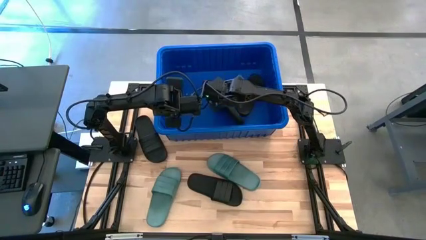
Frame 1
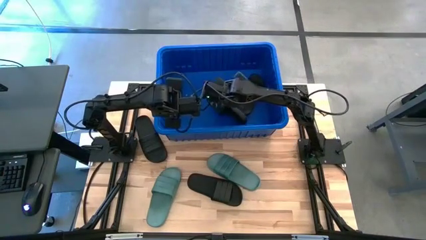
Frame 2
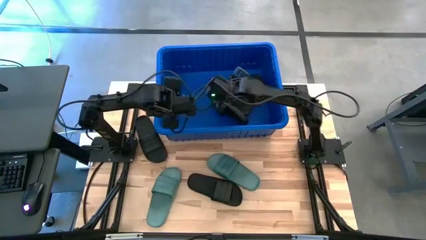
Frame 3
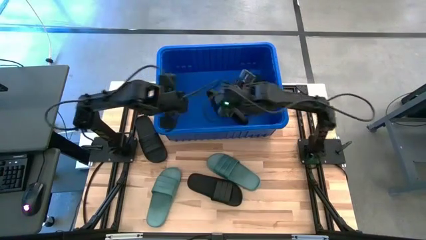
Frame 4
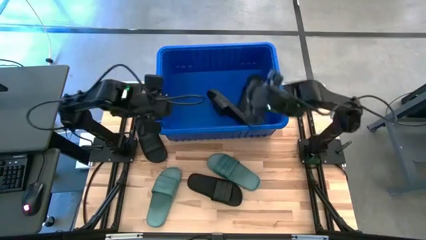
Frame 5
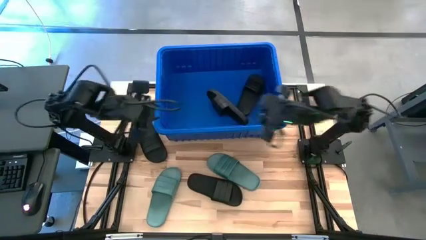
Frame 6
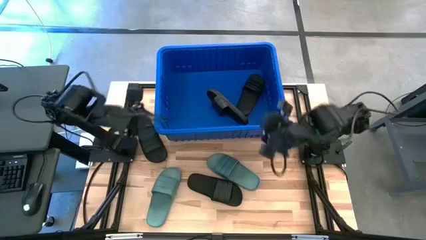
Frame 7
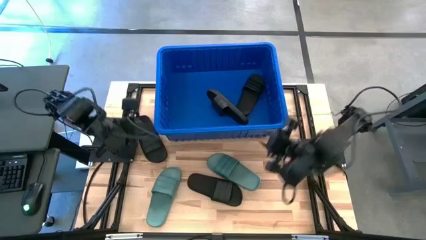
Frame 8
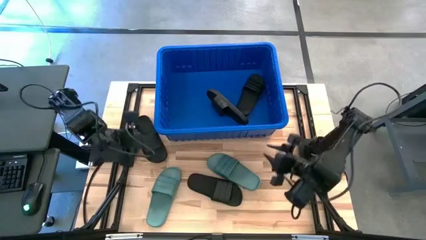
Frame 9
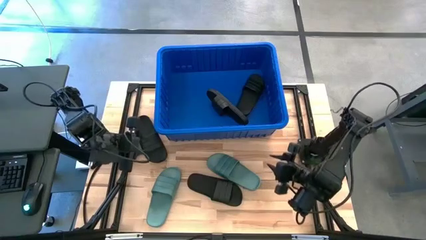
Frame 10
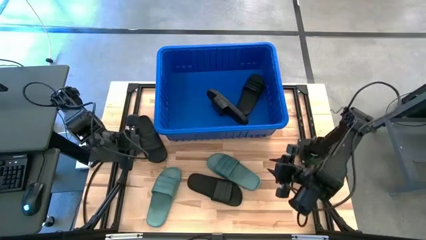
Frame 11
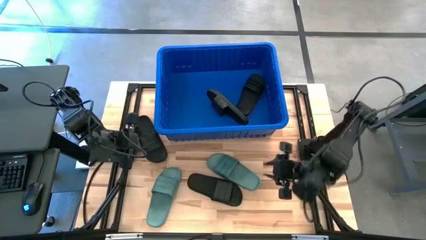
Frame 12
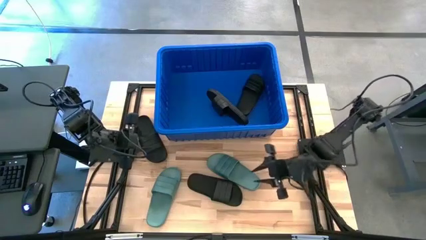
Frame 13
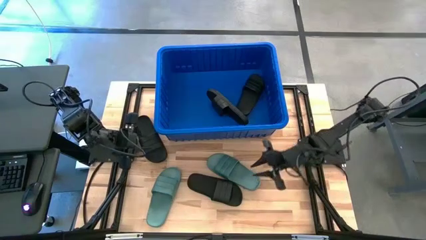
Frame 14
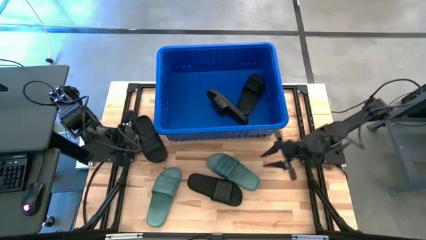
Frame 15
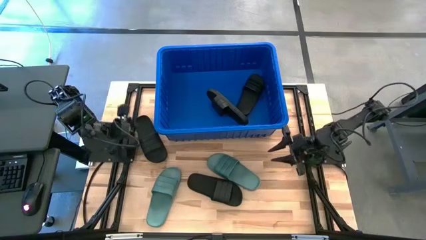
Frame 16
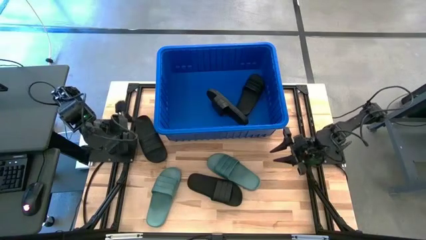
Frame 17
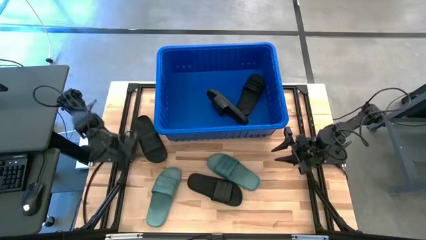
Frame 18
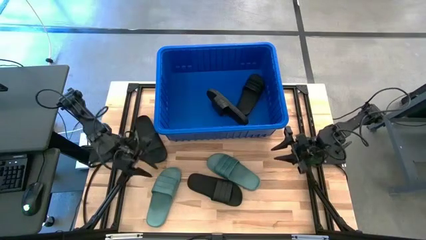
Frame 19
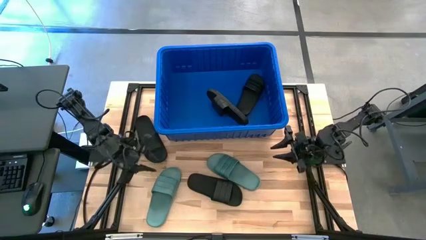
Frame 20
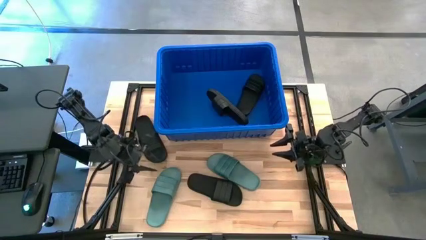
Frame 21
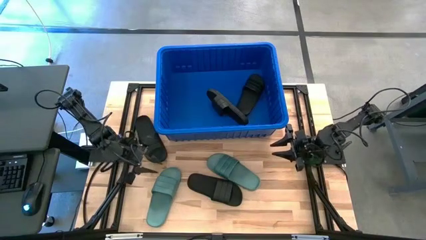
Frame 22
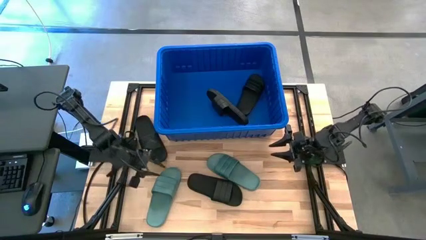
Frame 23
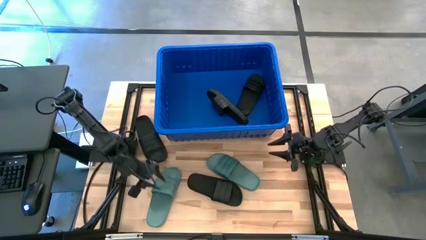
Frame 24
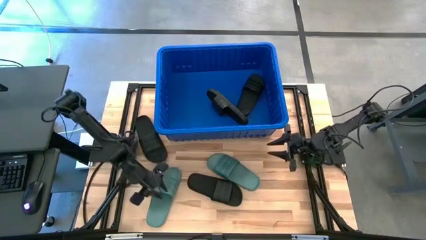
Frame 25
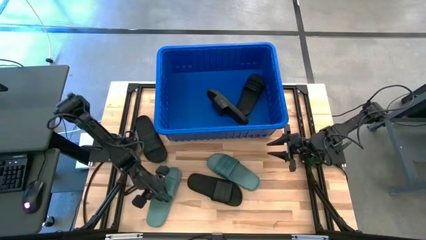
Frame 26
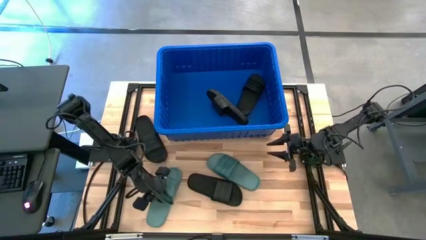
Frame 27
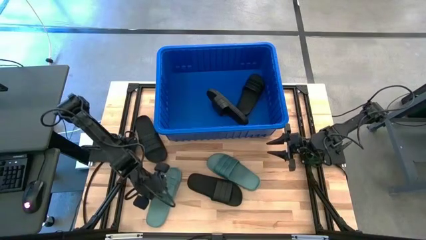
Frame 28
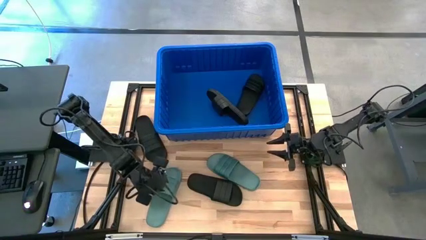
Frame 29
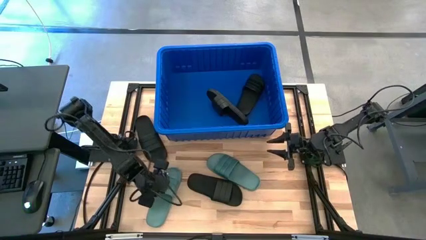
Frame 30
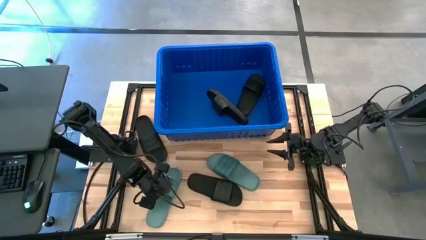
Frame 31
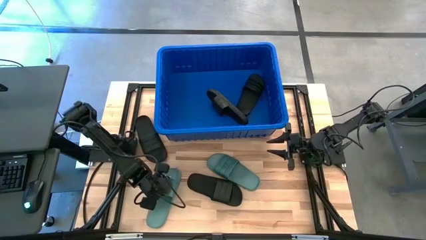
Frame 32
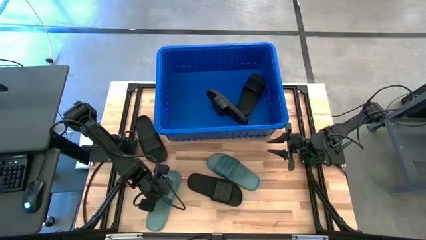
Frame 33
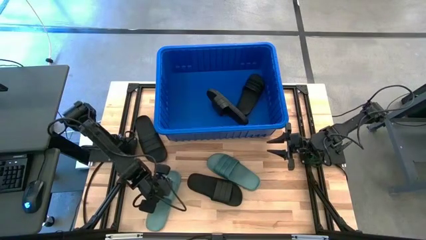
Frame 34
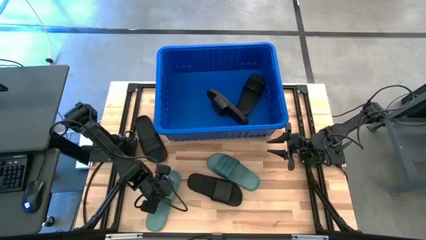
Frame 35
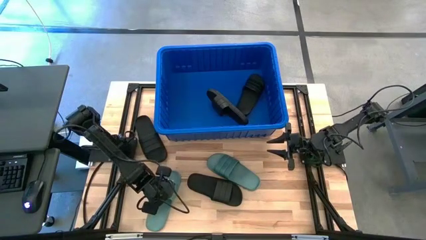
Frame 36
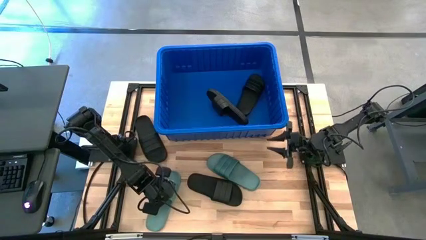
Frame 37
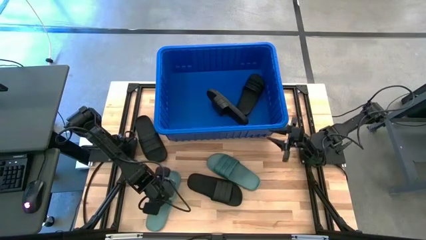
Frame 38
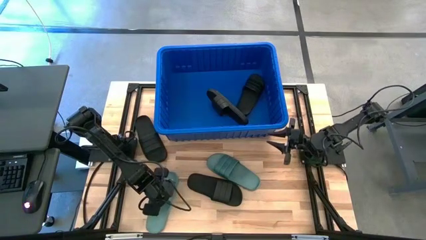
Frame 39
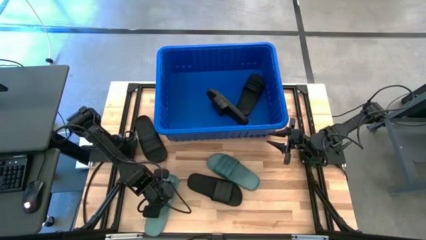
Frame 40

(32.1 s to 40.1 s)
Task: Pick and place slides into bin
Put the green slipper into the blue bin

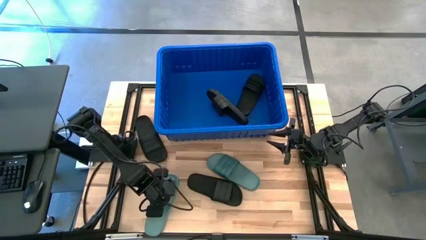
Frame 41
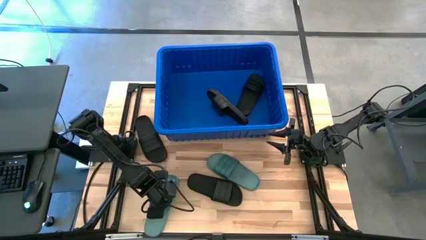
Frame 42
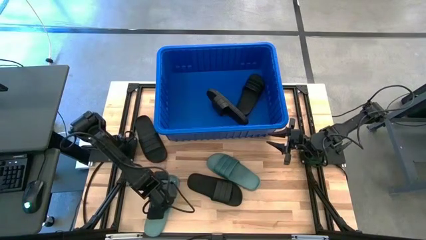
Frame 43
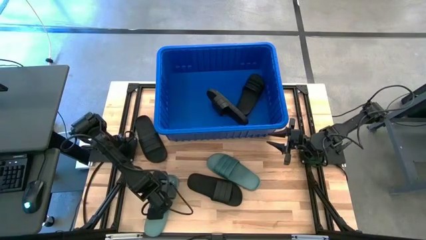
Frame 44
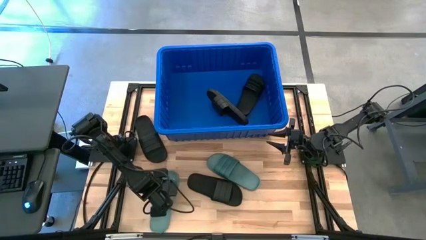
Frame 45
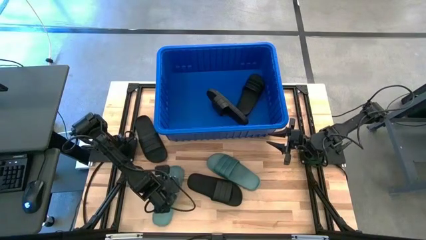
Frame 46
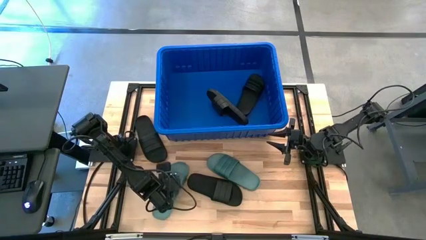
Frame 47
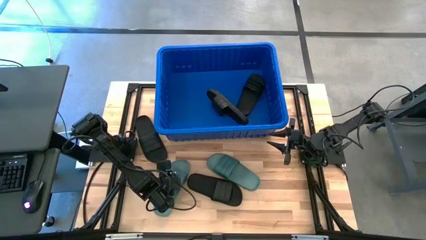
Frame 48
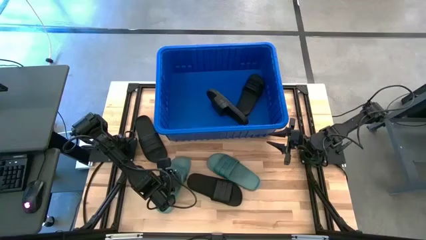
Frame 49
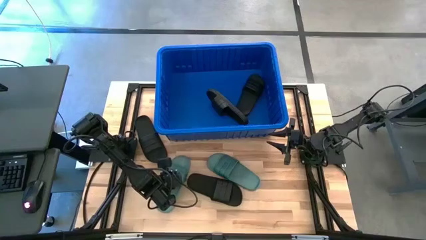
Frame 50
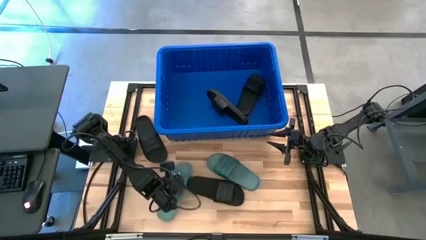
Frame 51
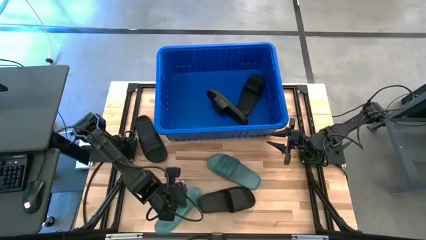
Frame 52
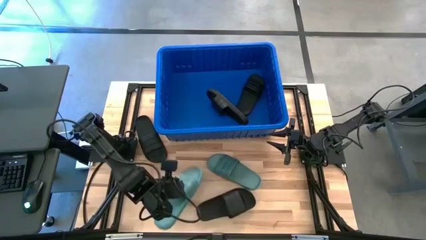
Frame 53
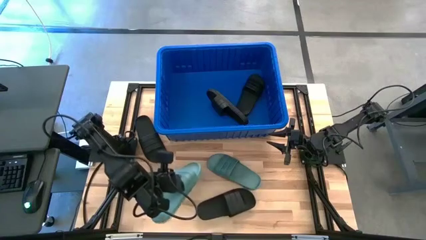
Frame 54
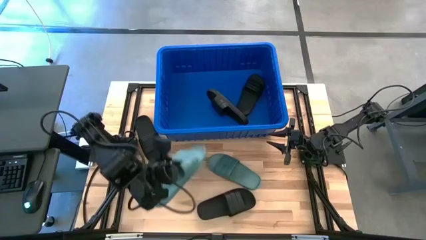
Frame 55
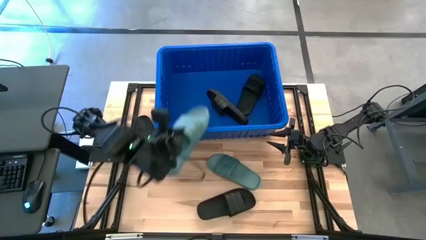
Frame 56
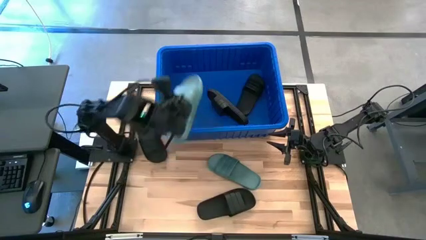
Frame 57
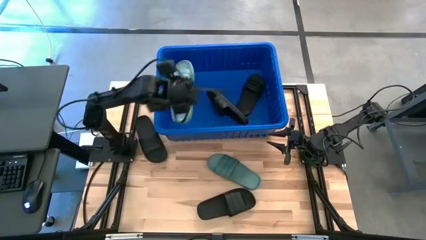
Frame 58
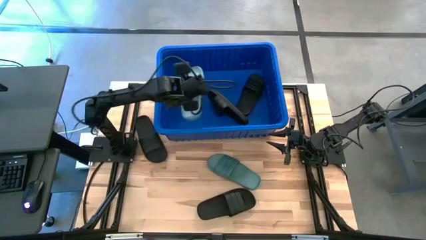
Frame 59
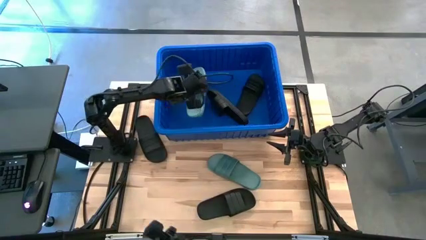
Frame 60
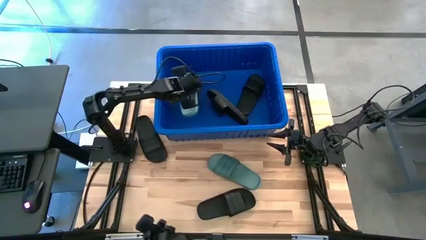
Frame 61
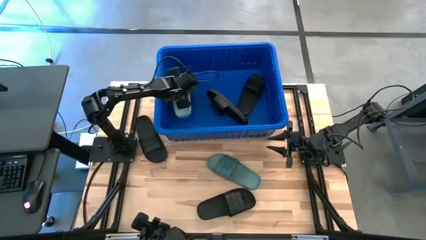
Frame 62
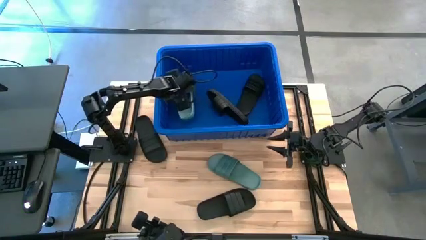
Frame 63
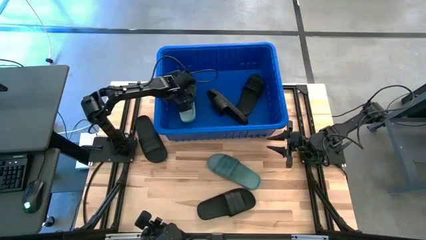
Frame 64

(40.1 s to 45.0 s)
Put the green slipper into the blue bin

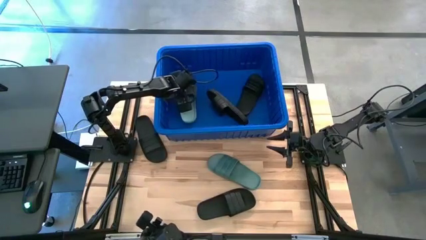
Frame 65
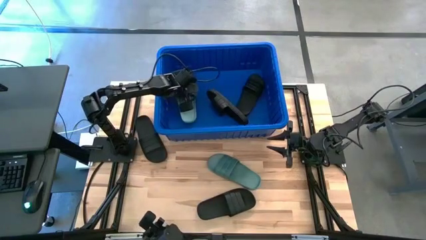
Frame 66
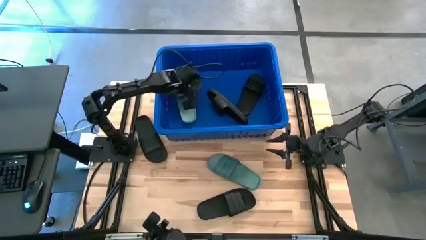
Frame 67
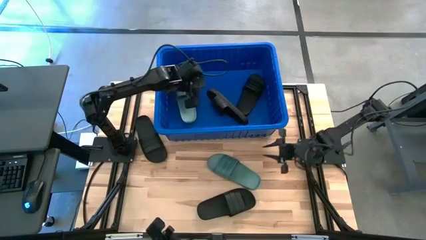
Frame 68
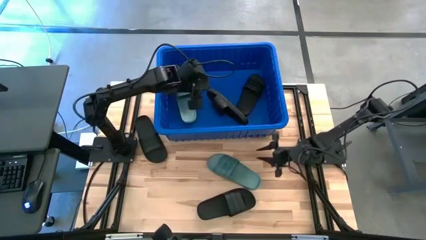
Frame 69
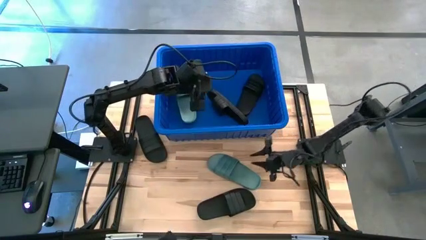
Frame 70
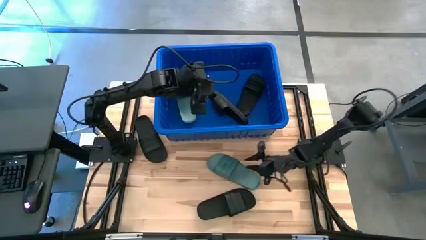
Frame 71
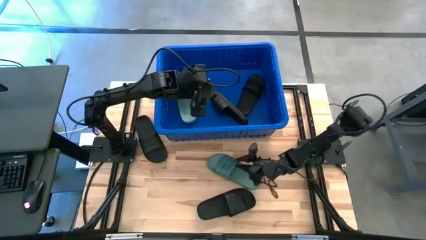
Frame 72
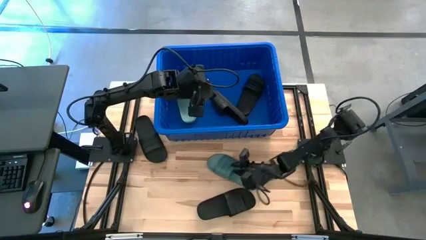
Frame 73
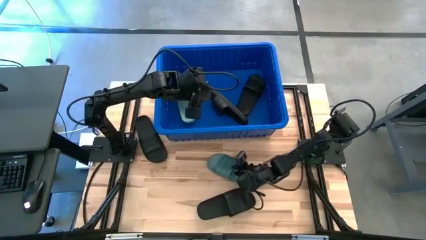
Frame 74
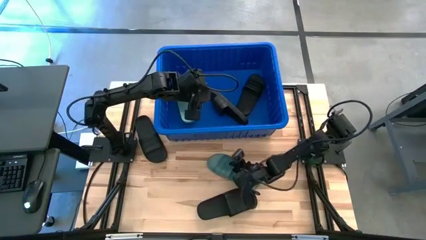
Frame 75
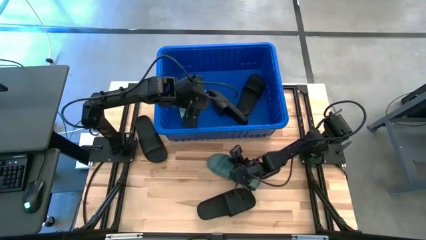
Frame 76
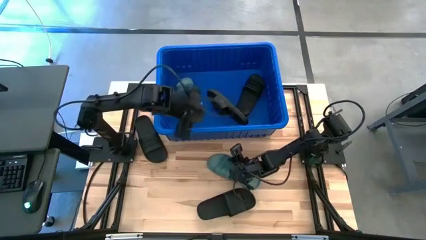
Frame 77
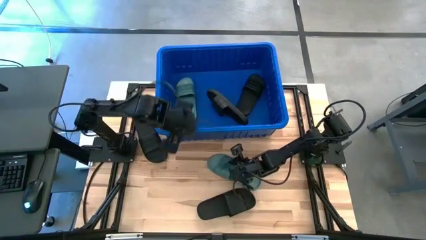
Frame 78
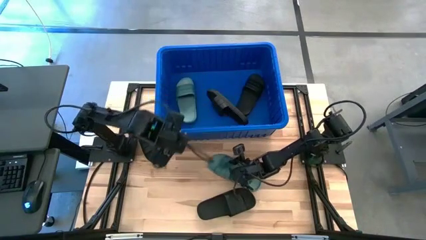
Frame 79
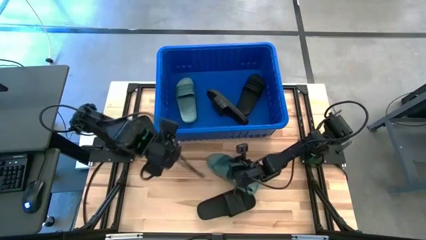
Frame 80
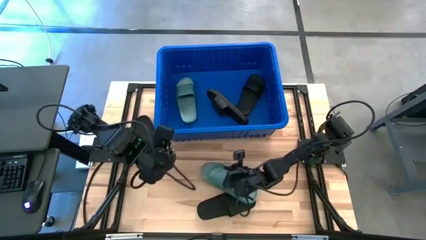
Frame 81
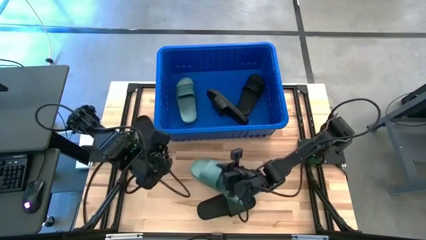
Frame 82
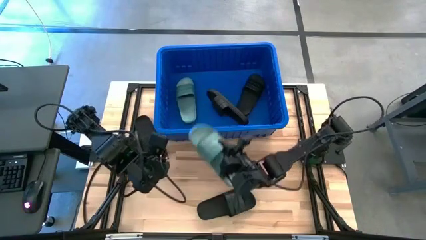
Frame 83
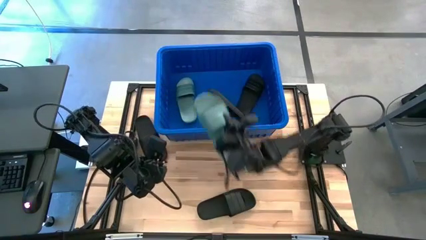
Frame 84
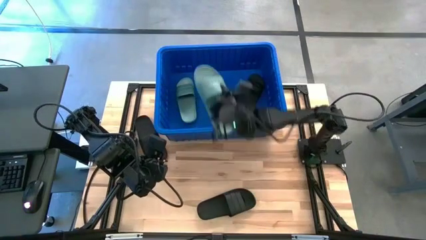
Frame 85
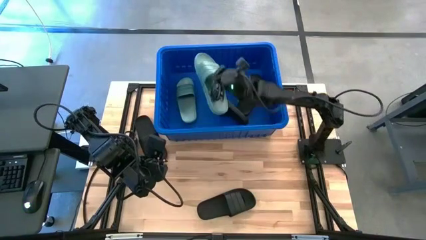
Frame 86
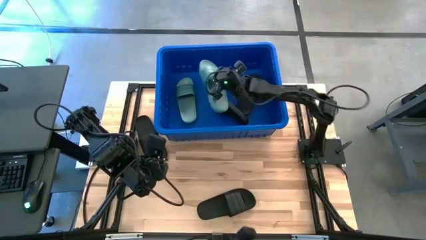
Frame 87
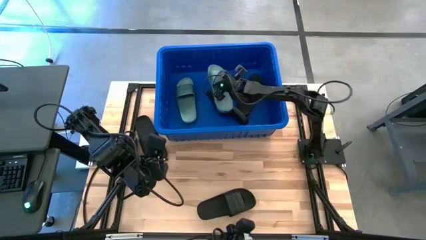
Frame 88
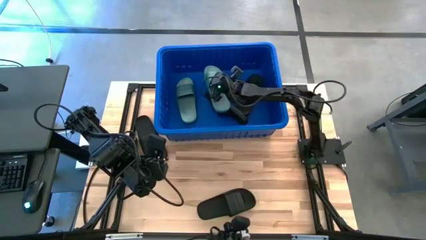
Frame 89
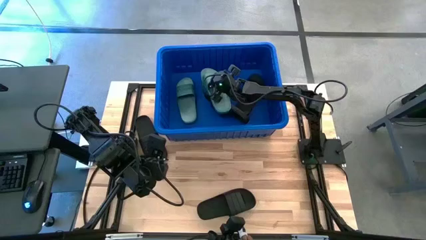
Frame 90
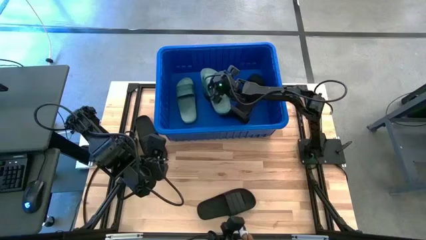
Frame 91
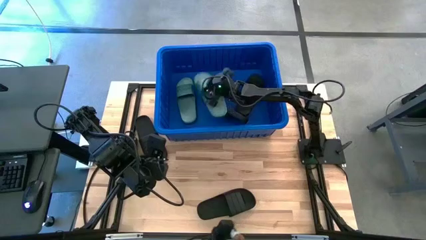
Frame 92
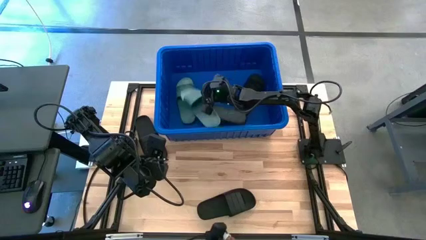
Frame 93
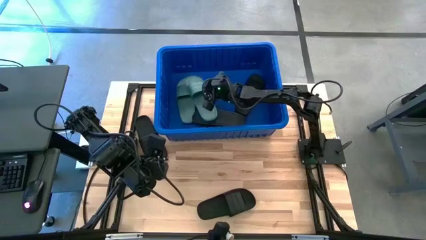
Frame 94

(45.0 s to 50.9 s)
Put the green slipper into the blue bin
